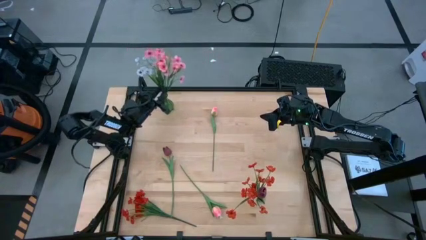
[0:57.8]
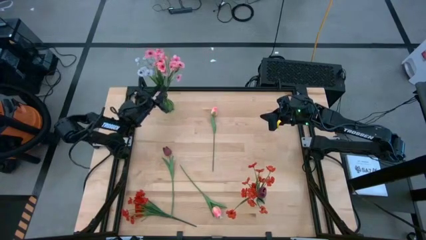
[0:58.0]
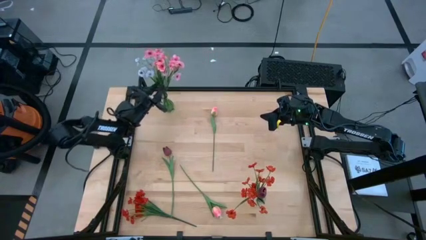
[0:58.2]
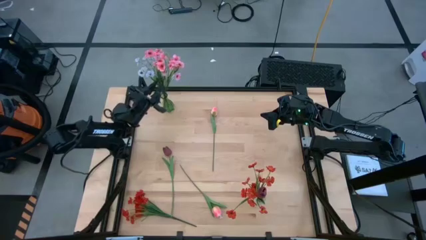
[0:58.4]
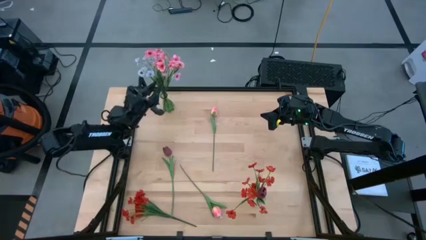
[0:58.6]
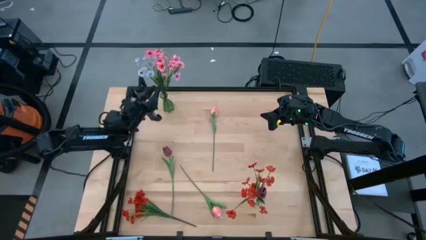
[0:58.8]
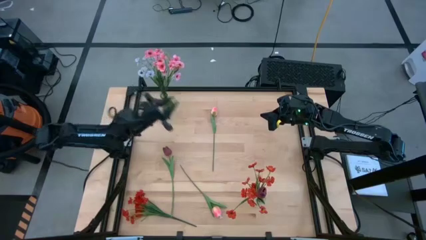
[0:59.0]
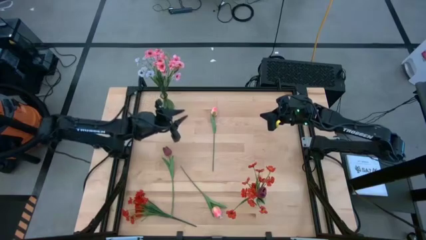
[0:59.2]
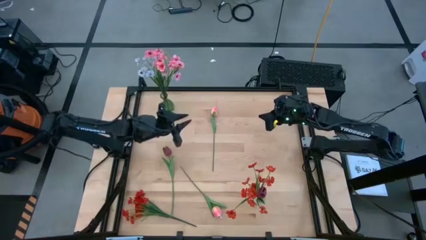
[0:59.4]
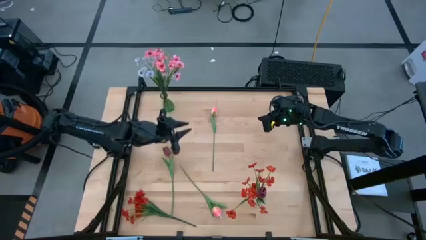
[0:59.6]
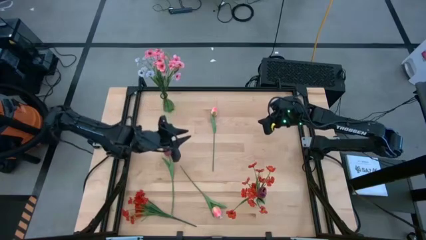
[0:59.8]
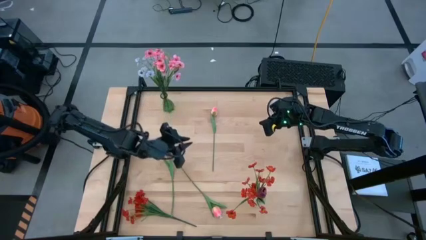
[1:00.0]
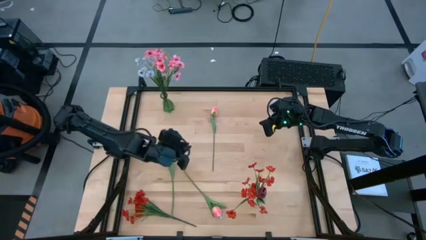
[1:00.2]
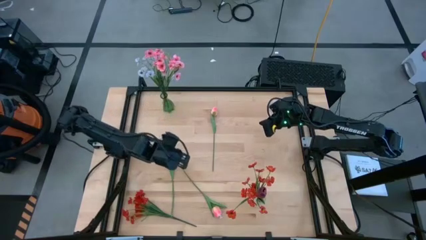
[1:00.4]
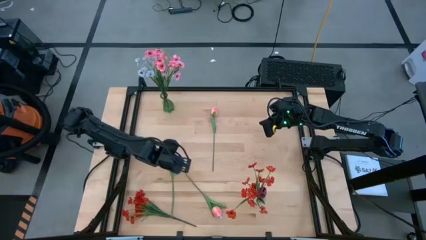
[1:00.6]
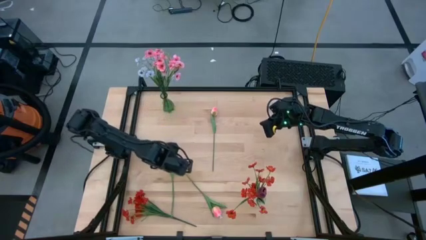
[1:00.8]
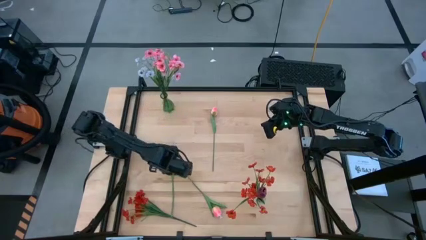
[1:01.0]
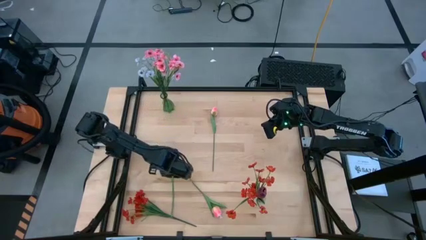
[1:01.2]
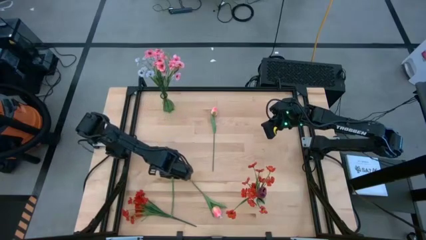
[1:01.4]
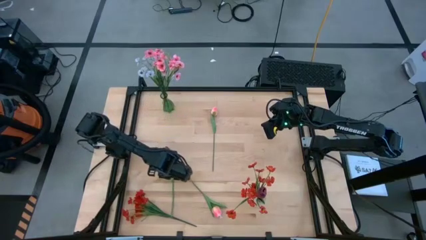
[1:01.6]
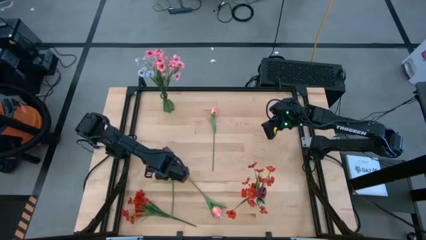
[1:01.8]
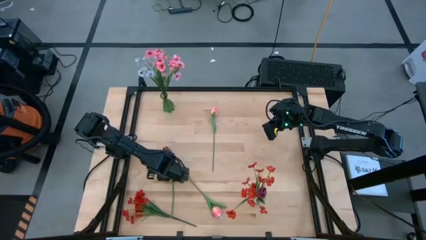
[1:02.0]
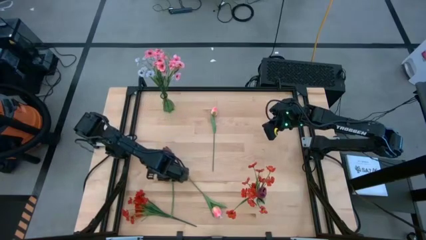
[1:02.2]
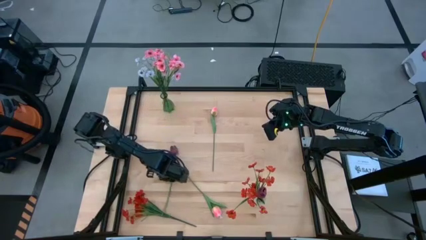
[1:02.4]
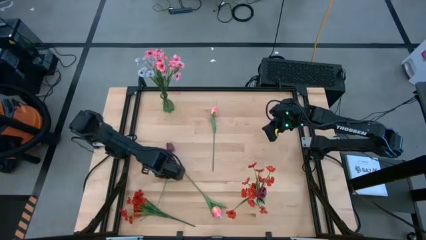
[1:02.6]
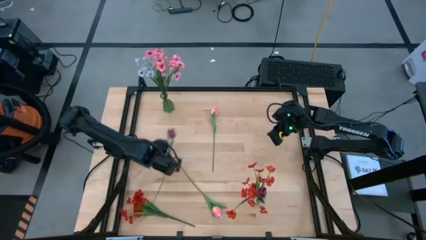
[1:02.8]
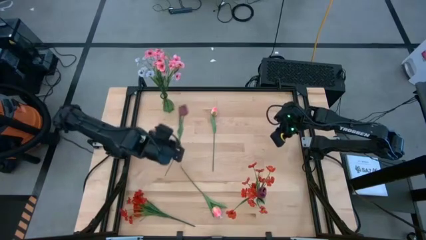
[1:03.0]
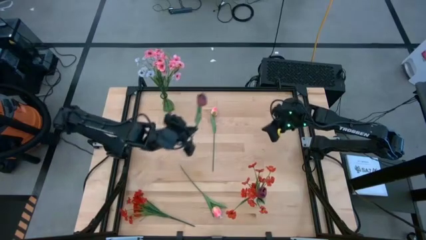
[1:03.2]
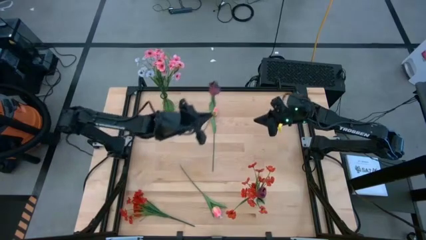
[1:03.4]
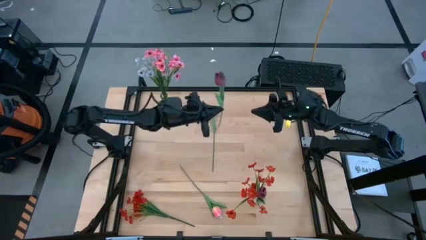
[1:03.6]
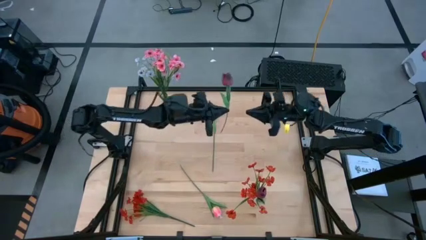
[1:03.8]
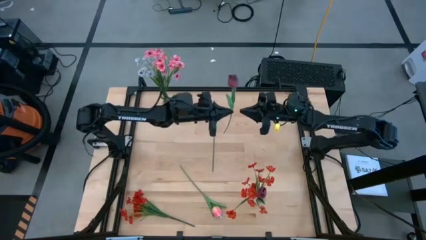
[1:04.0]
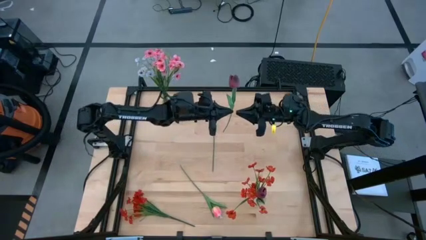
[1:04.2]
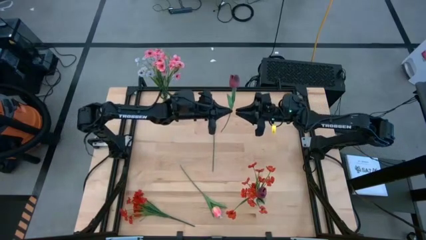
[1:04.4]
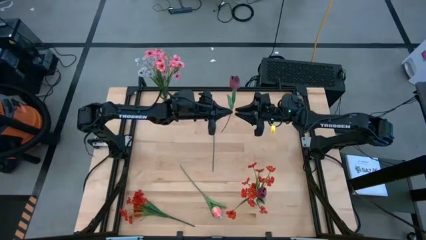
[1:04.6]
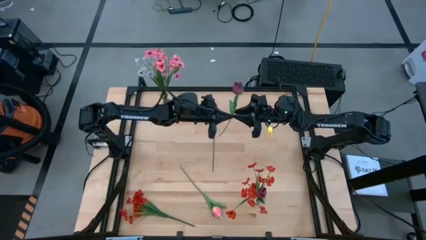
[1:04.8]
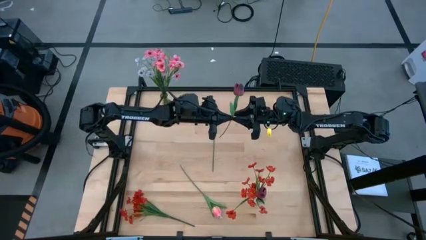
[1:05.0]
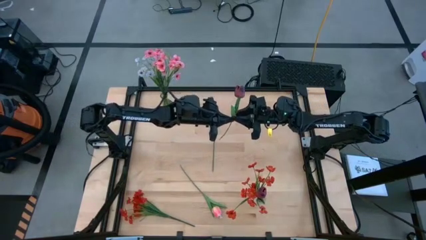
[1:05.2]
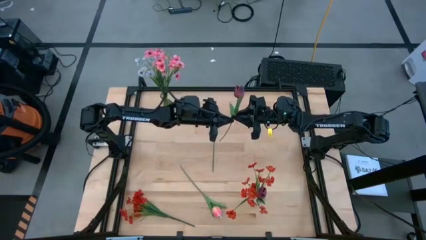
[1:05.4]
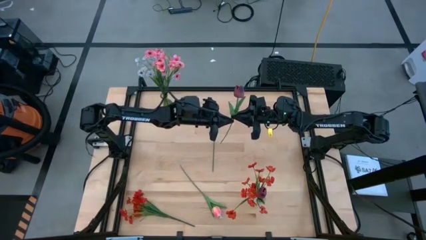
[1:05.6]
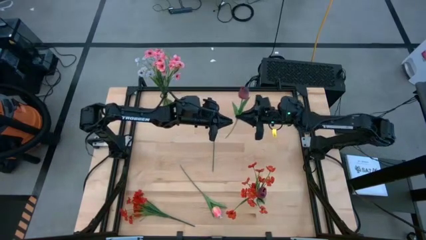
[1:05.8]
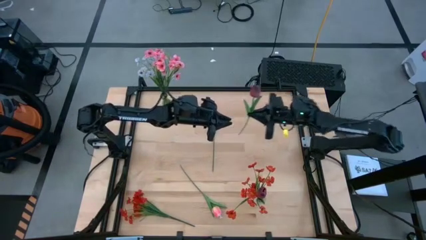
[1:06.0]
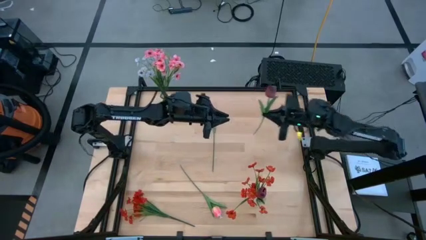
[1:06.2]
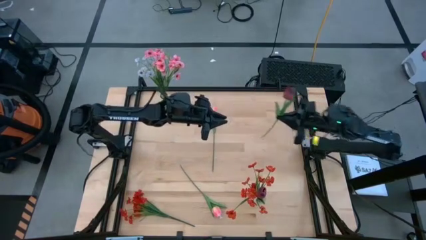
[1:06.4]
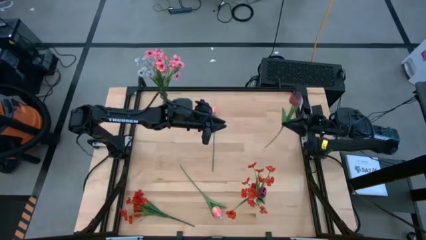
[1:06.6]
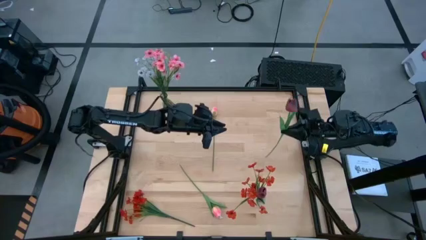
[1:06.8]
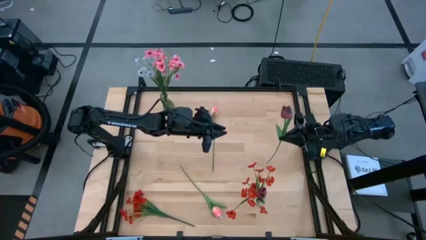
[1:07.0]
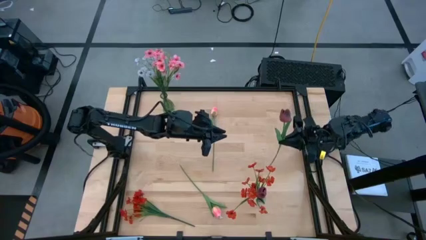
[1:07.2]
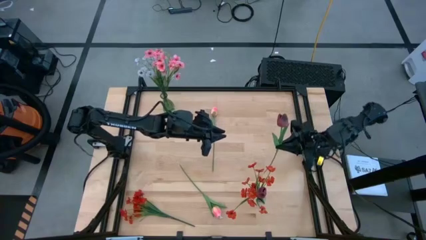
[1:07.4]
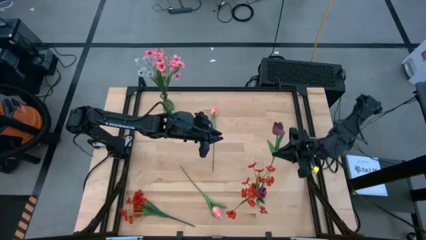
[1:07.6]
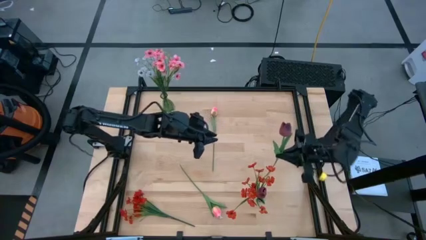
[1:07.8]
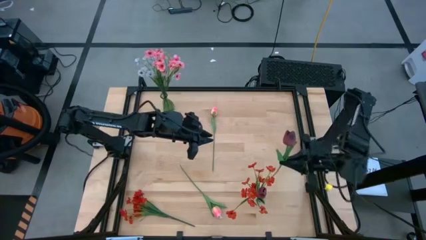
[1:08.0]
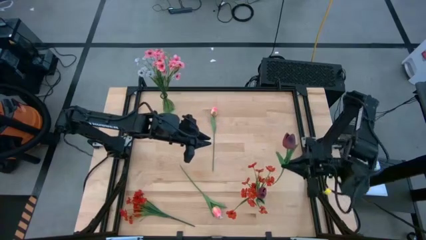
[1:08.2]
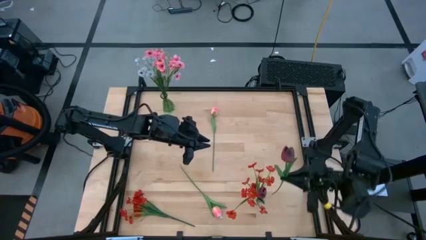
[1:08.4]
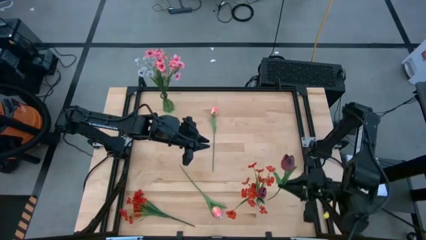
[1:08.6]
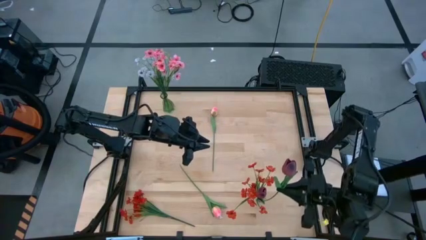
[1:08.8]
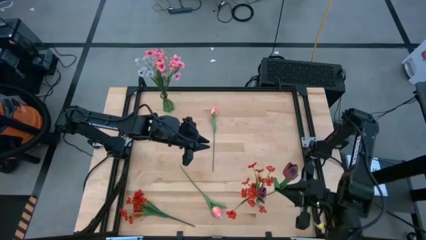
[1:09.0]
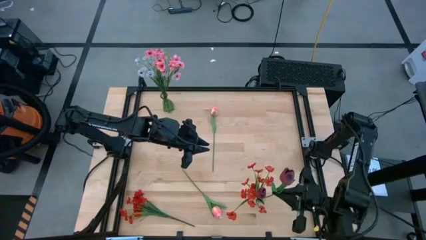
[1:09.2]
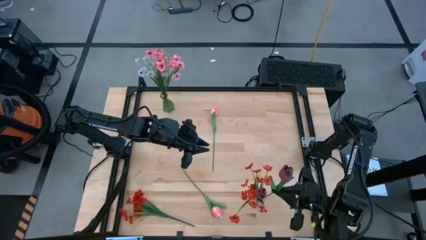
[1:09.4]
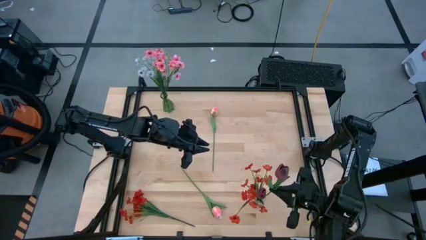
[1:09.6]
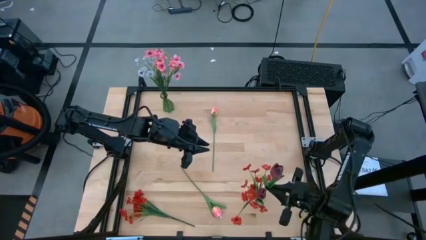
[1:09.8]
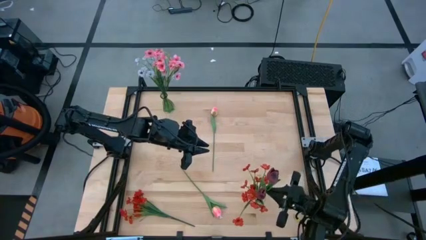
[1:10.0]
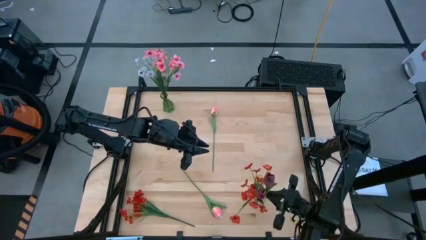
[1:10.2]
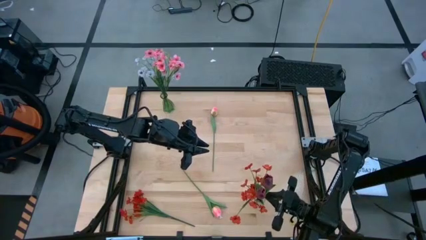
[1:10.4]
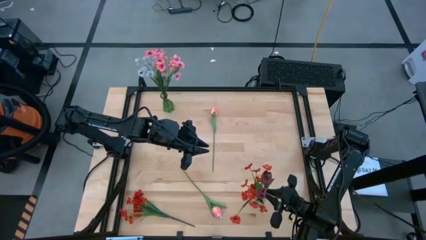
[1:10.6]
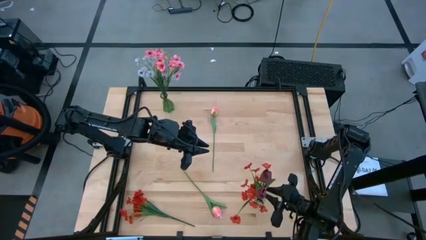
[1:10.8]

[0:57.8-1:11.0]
Task: Sort flowers into vase by color
Put the red tulip into the transparent vase
